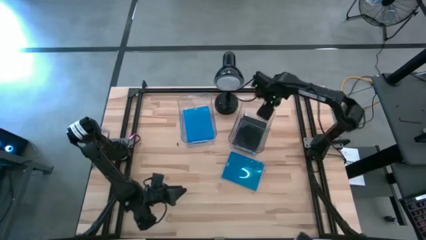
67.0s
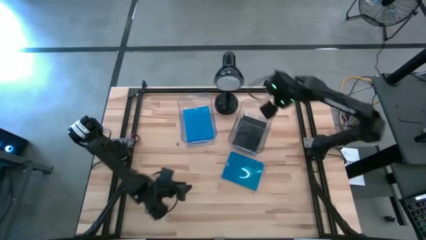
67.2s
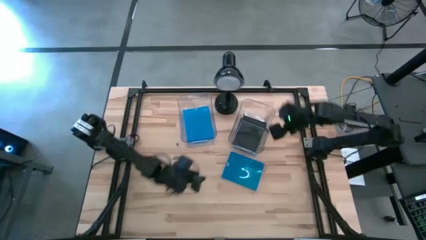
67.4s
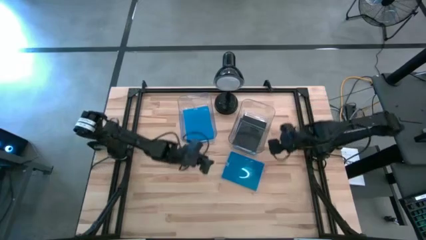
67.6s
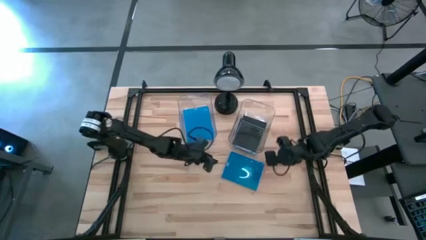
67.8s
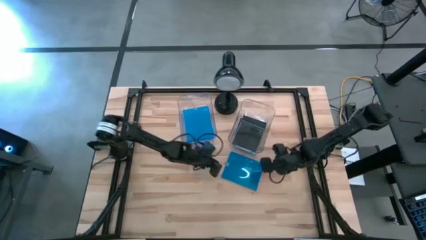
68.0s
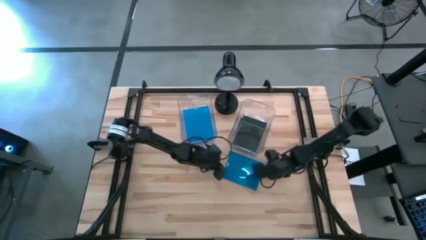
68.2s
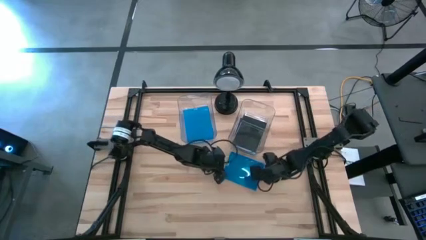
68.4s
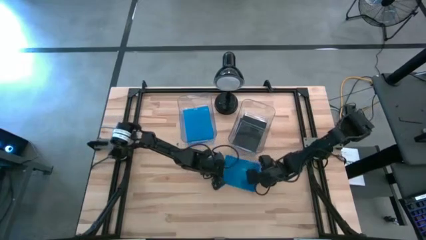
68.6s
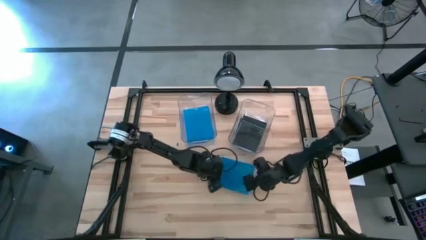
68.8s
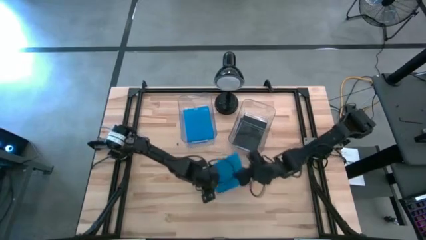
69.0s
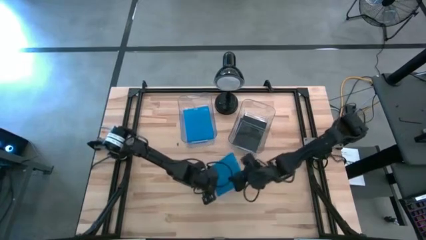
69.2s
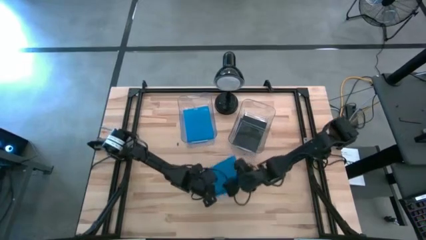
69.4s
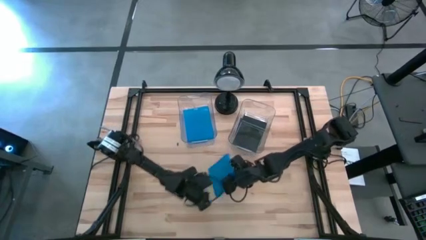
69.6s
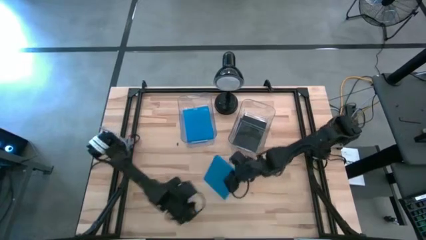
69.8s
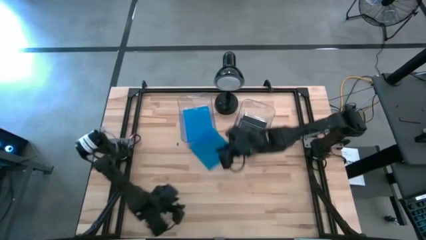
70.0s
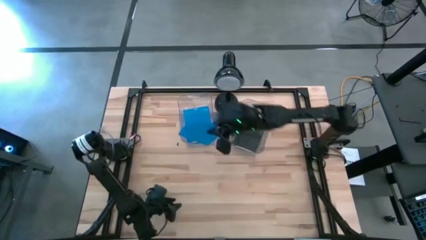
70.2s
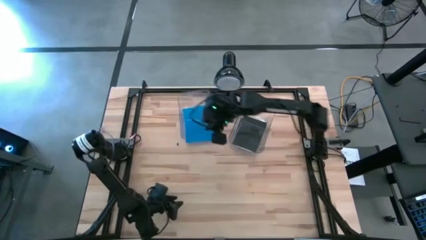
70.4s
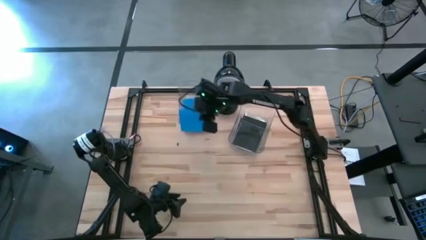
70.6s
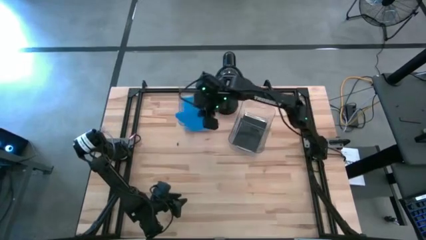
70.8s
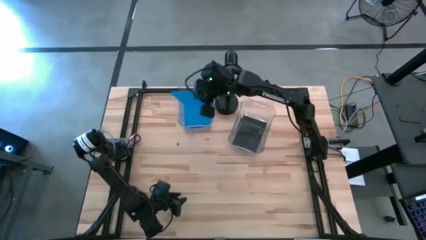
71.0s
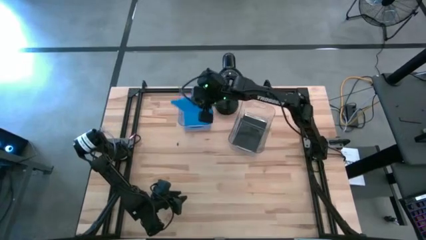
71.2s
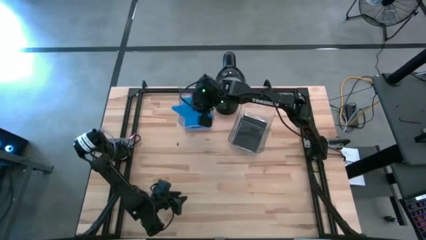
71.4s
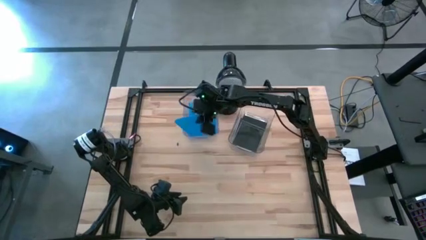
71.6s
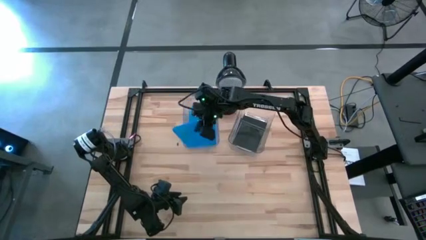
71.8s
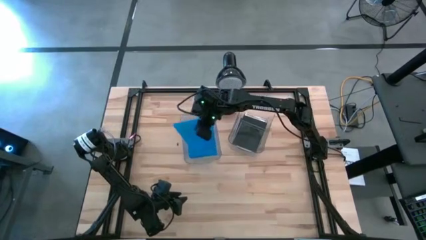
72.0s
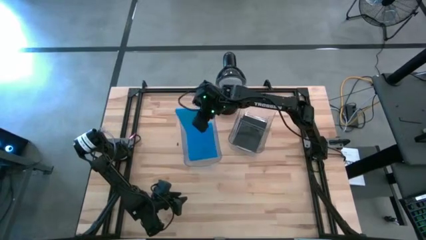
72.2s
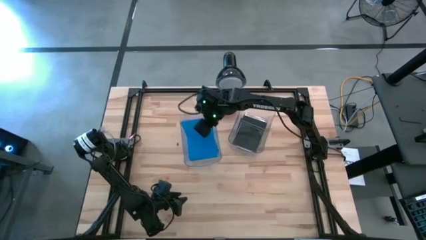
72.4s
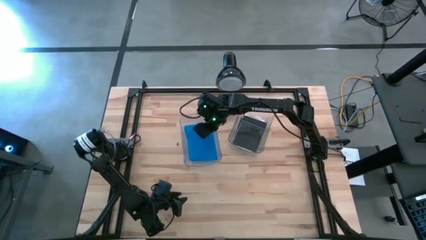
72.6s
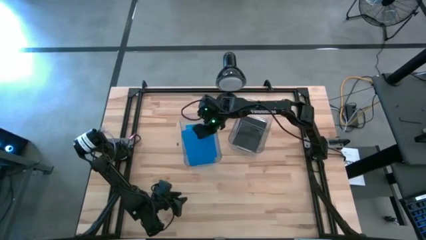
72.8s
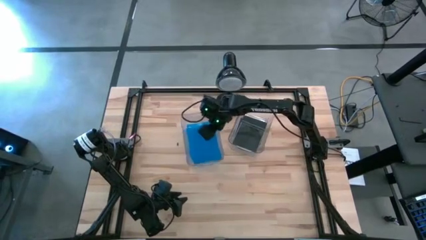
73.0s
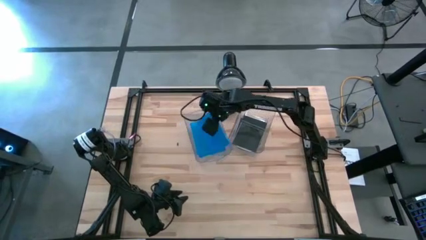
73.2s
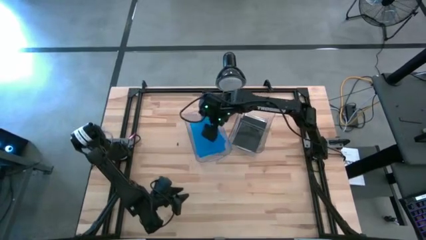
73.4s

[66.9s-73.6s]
Task: Pick & place jewel cases by type
Put the blue CD case into the left transparent bin

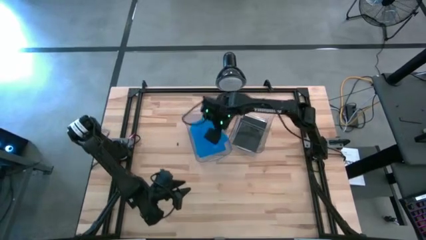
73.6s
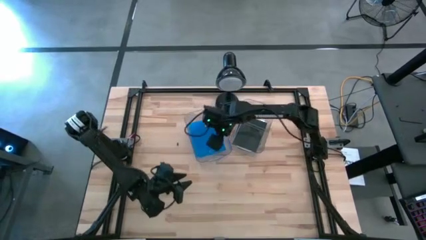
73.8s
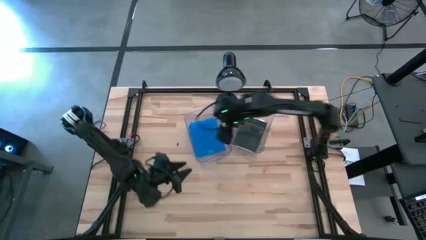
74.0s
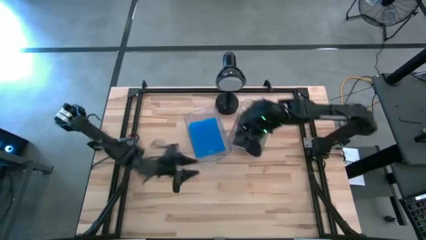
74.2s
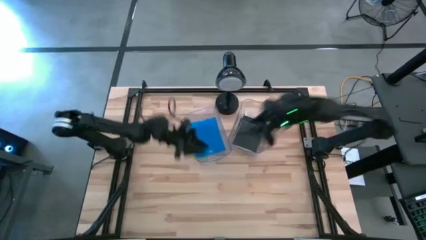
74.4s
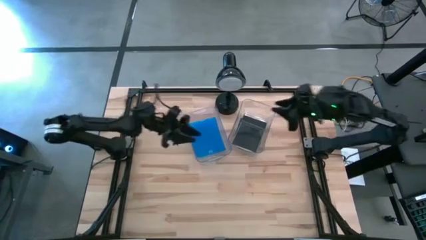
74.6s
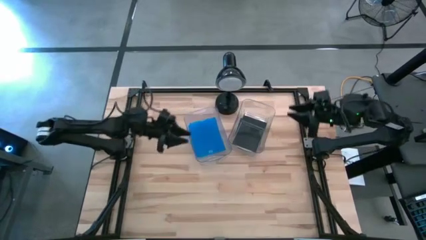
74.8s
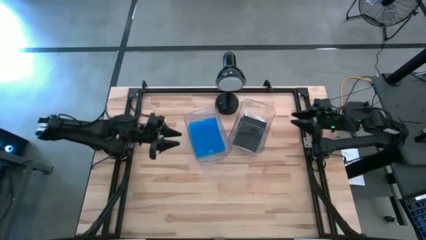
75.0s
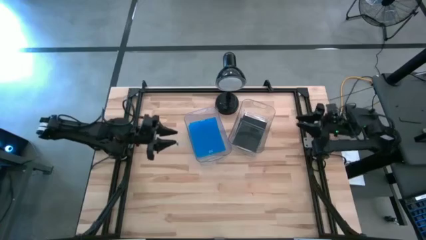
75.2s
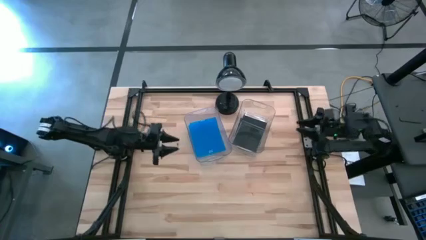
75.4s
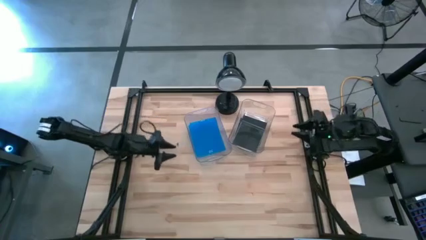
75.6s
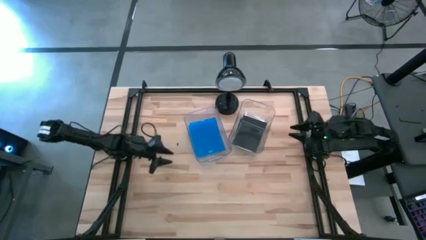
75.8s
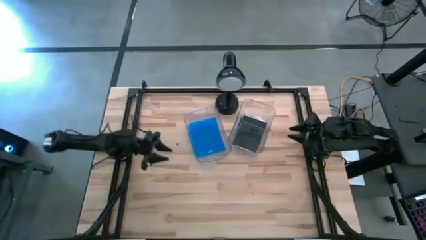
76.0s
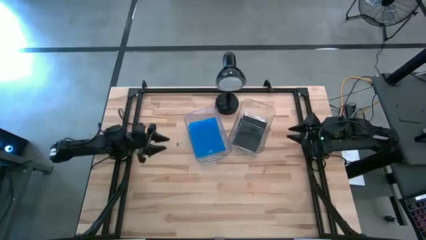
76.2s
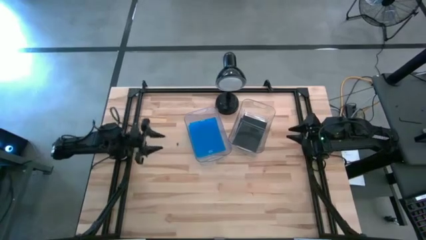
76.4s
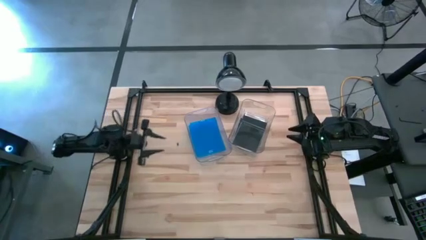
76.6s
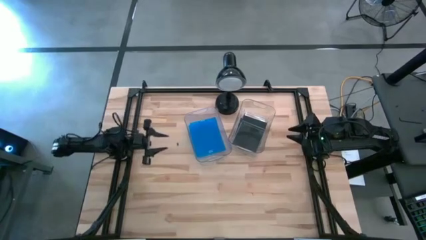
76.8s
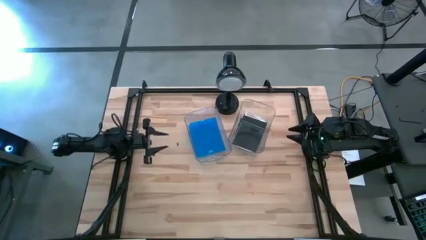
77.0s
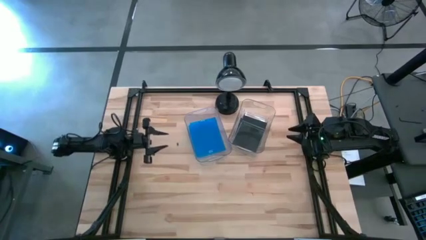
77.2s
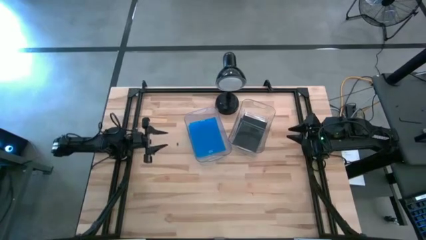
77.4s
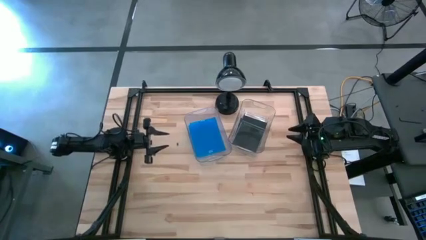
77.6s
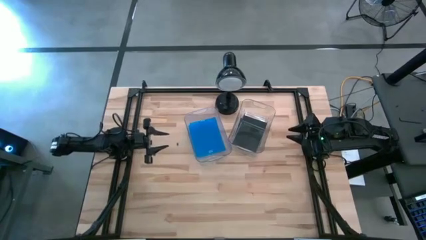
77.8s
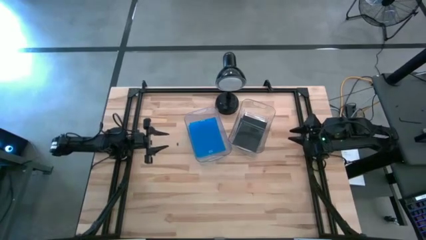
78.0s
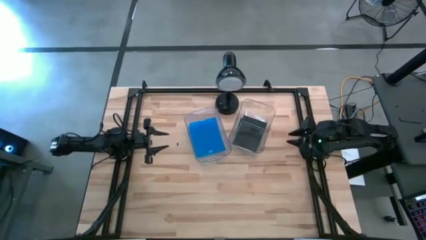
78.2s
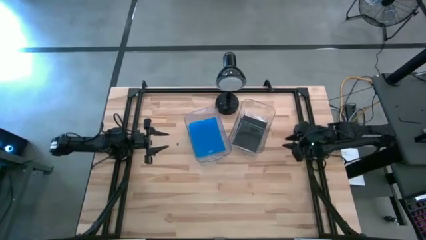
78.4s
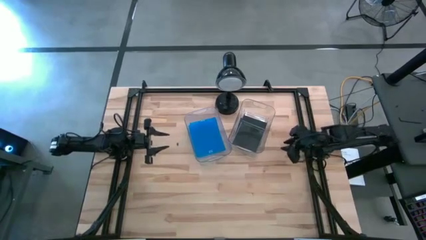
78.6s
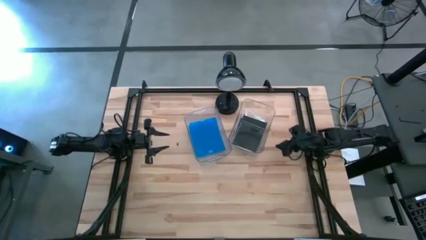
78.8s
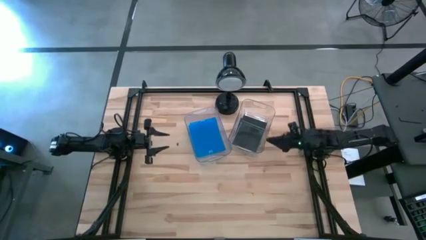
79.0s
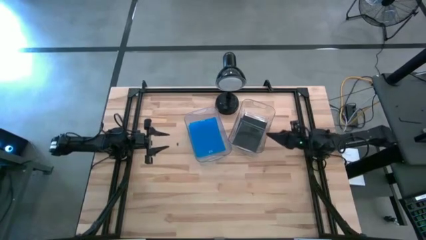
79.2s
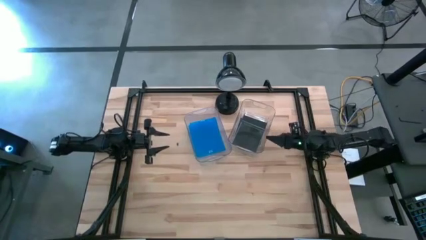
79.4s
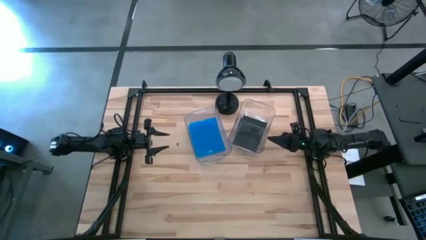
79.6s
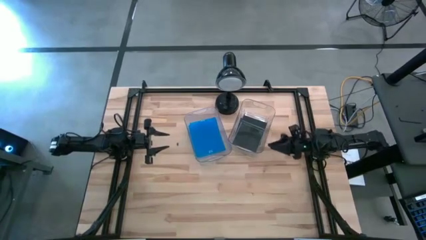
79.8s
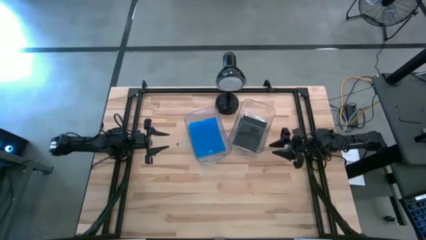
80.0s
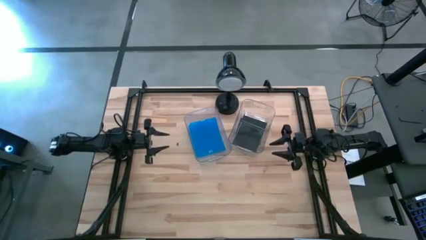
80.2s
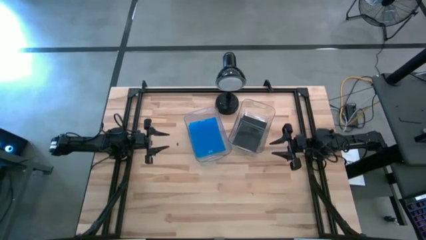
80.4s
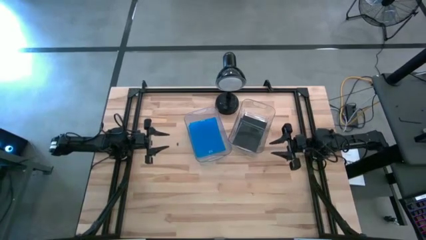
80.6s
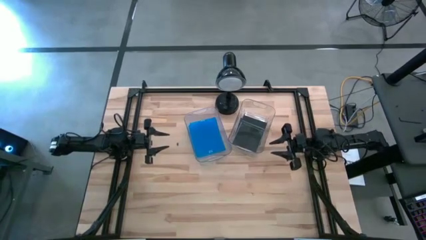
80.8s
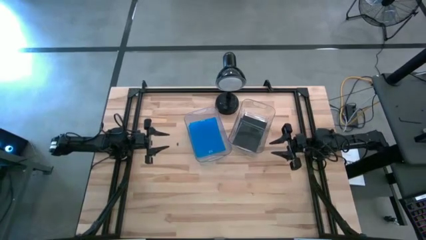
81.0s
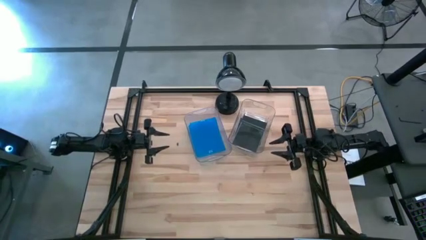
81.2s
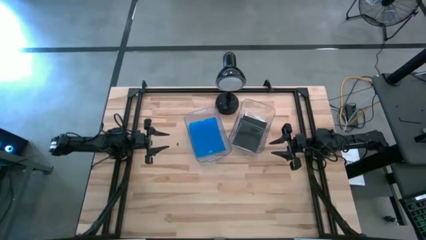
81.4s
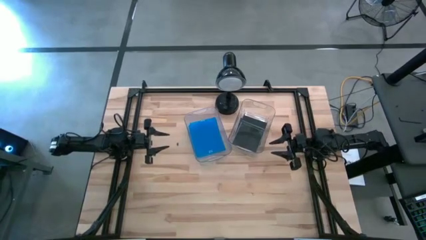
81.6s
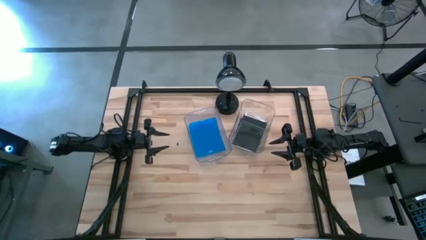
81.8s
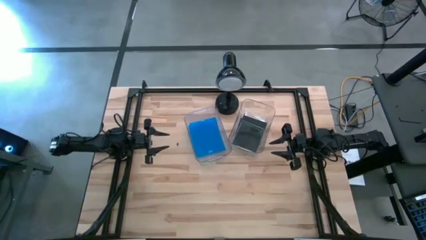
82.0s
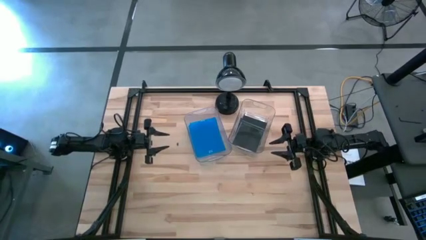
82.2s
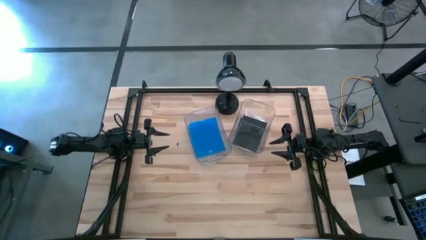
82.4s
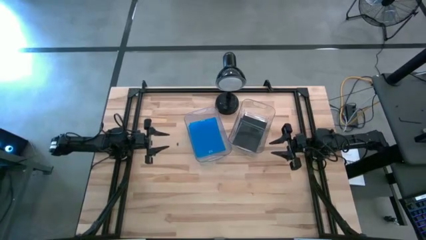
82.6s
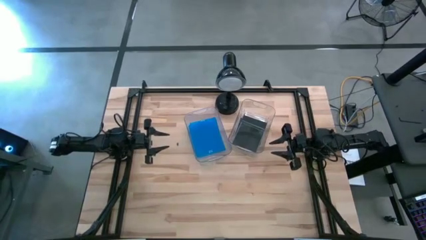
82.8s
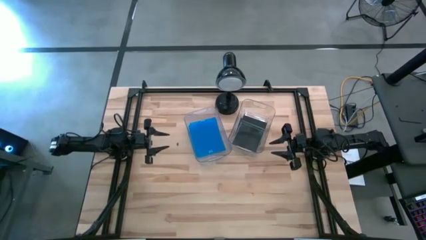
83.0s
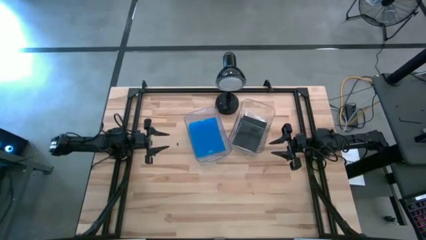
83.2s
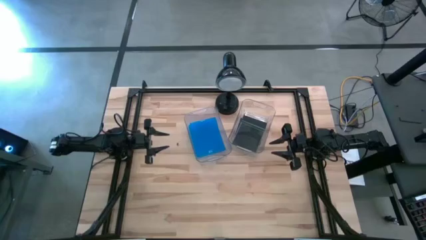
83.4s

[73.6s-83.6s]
Return to Home Position

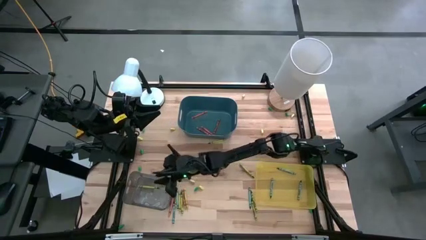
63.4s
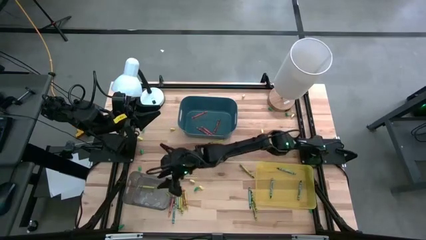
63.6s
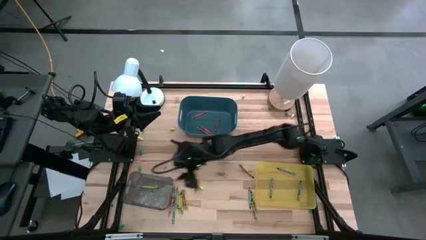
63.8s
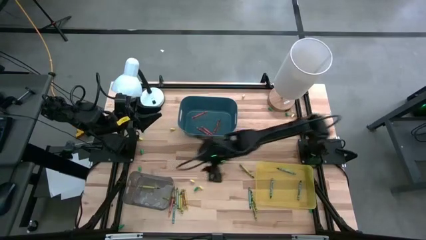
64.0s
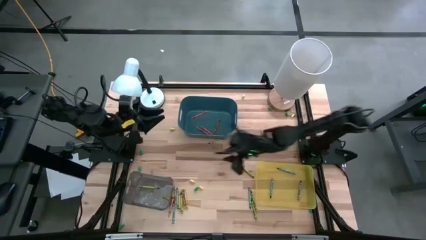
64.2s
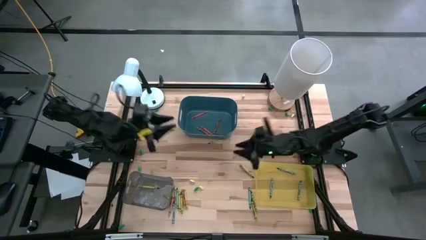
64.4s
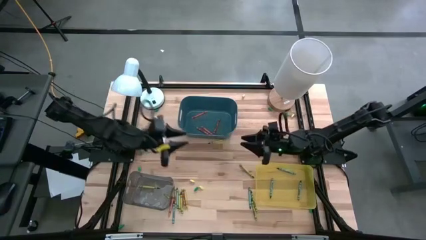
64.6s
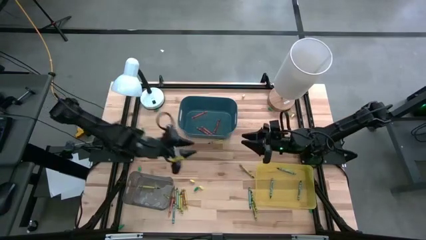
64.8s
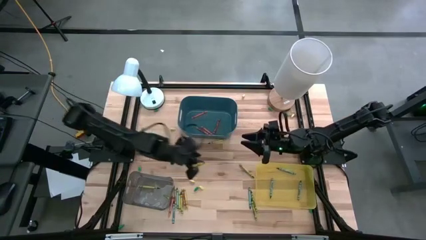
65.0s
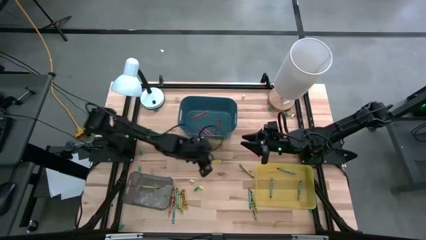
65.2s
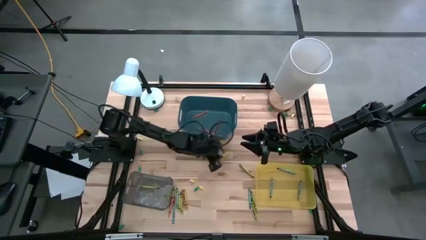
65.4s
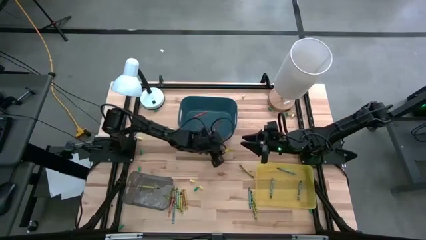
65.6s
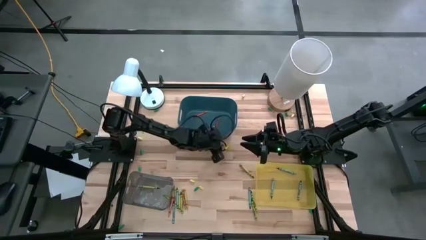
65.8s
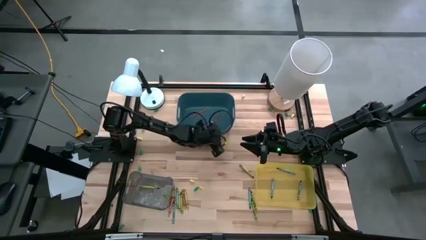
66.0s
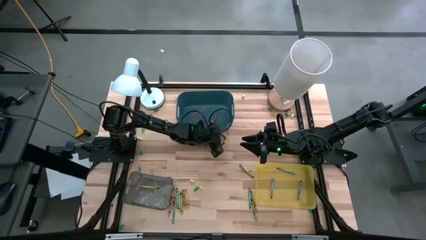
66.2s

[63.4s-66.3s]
Task: Sort crayons
Adjust the blue bin on the table
